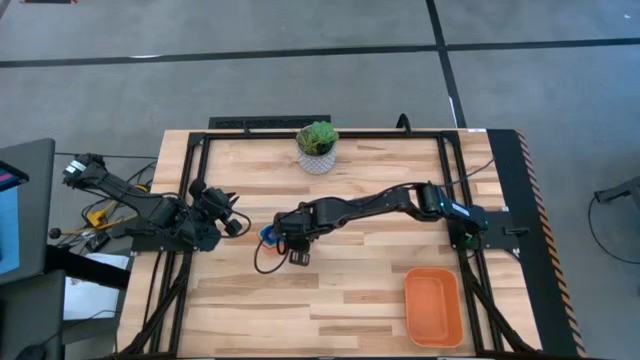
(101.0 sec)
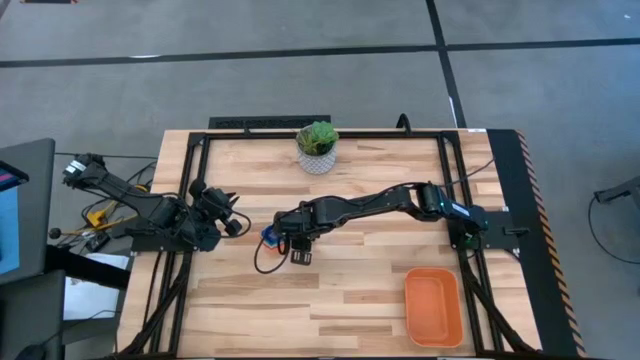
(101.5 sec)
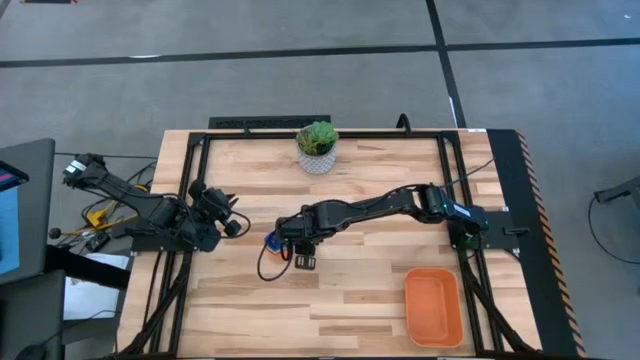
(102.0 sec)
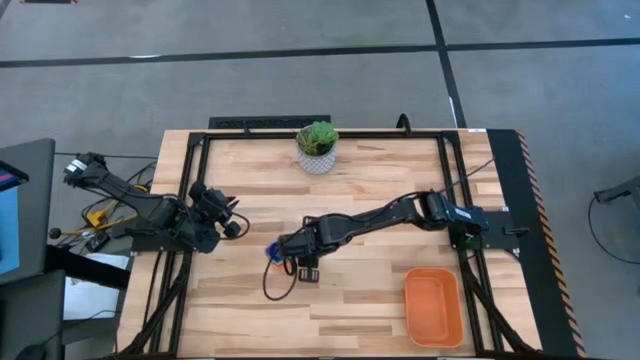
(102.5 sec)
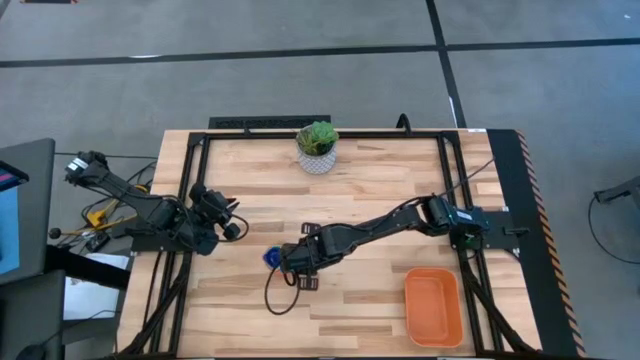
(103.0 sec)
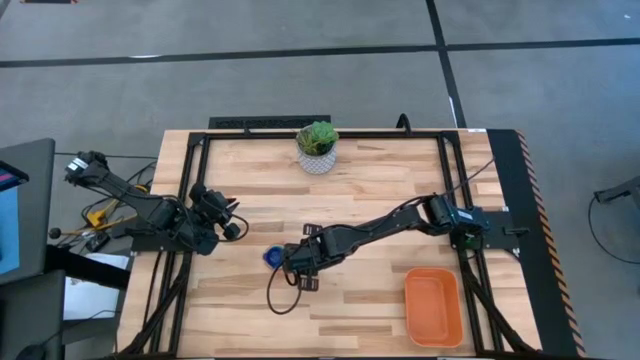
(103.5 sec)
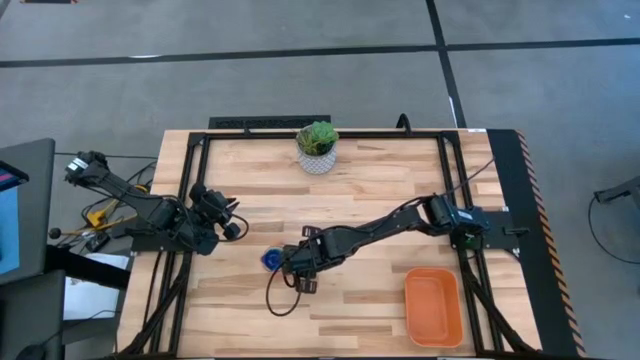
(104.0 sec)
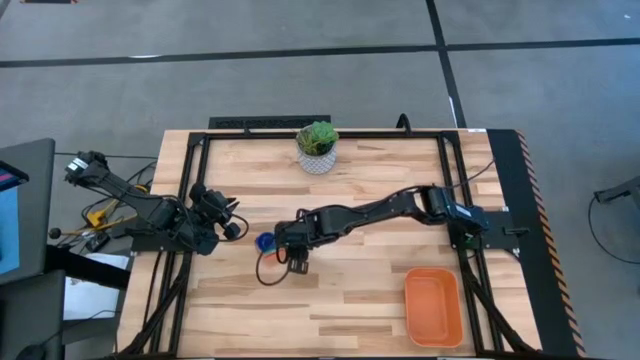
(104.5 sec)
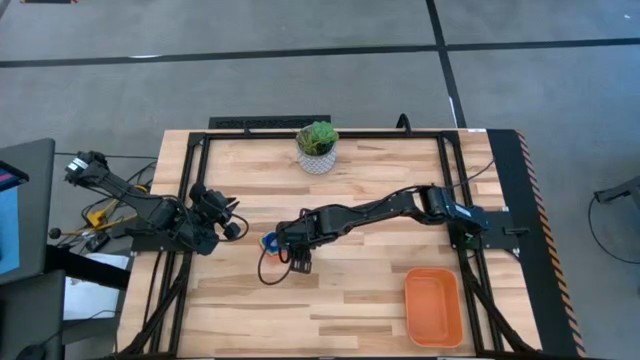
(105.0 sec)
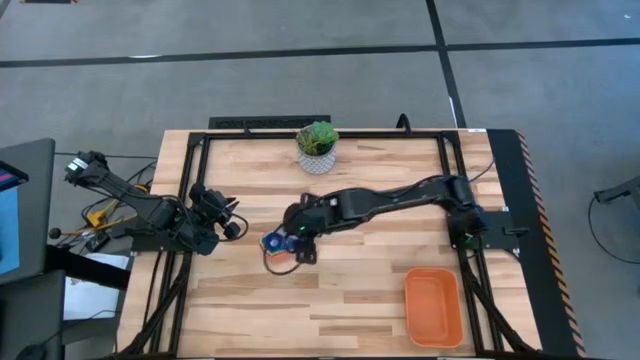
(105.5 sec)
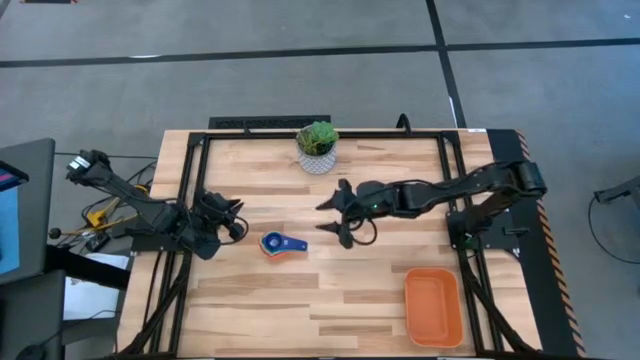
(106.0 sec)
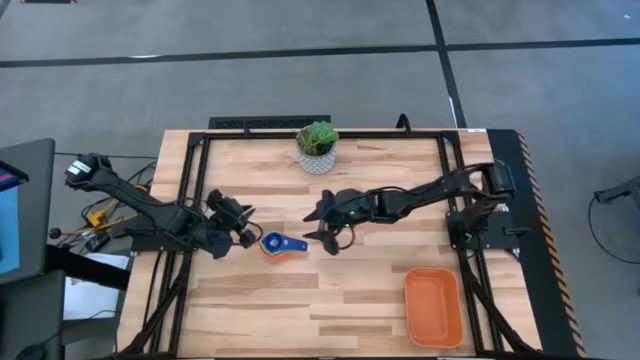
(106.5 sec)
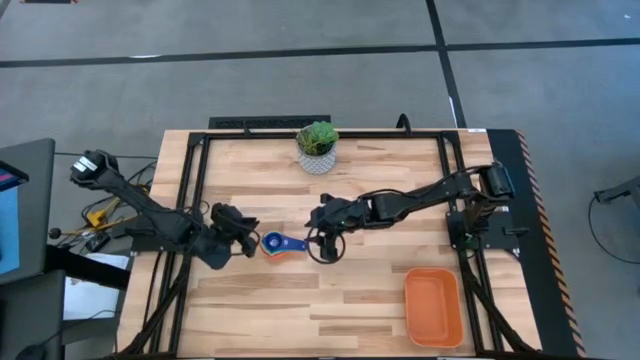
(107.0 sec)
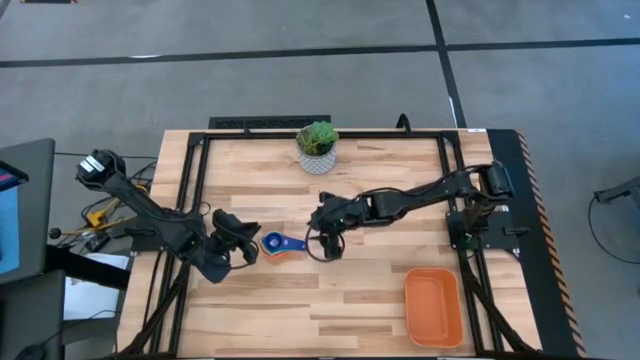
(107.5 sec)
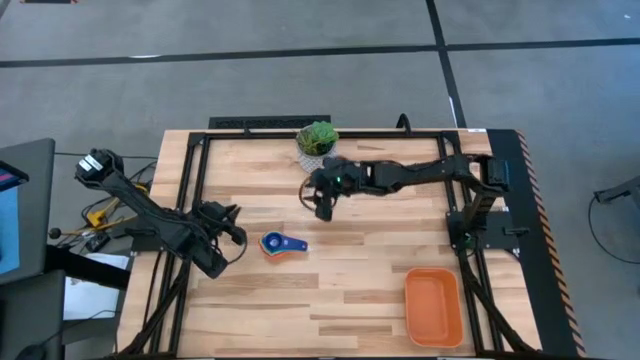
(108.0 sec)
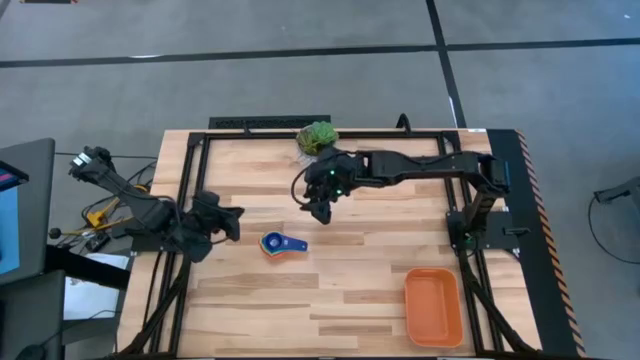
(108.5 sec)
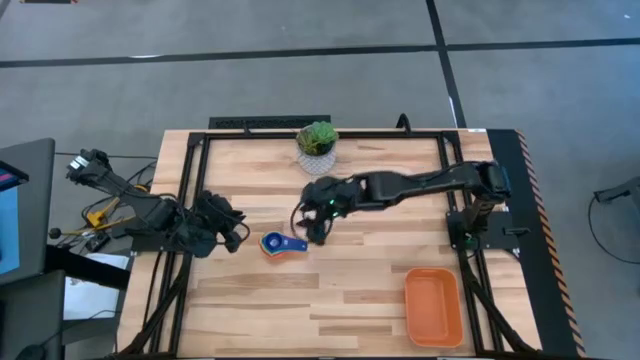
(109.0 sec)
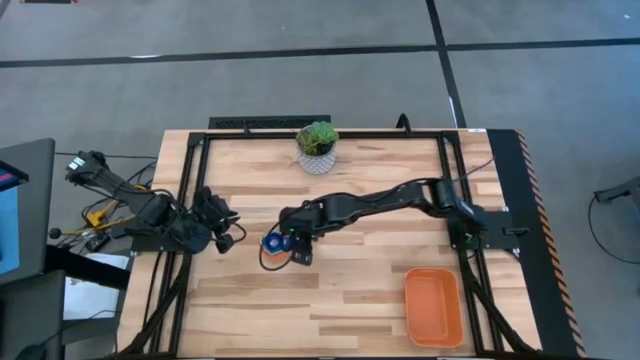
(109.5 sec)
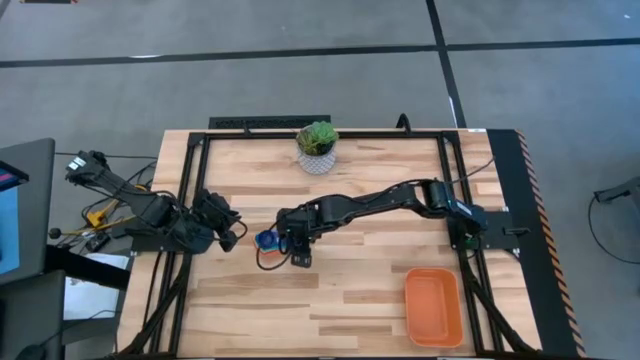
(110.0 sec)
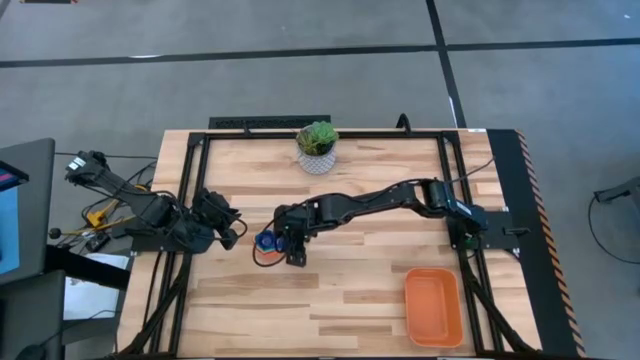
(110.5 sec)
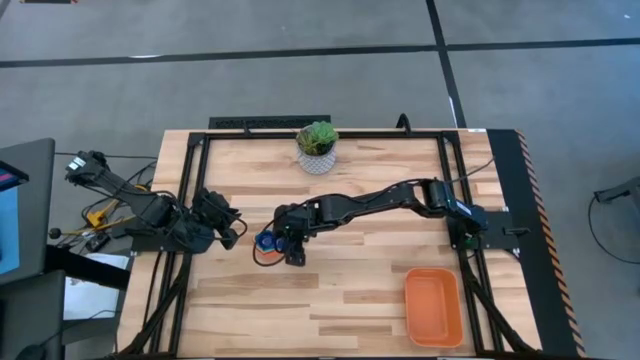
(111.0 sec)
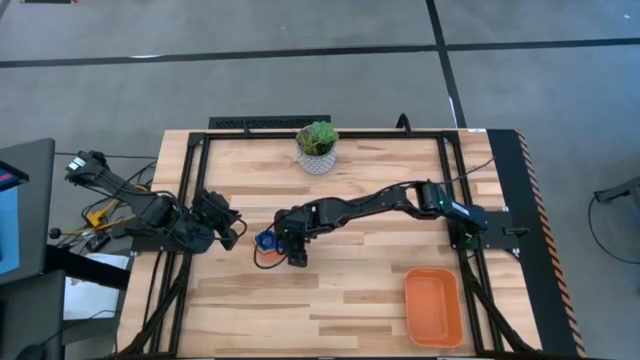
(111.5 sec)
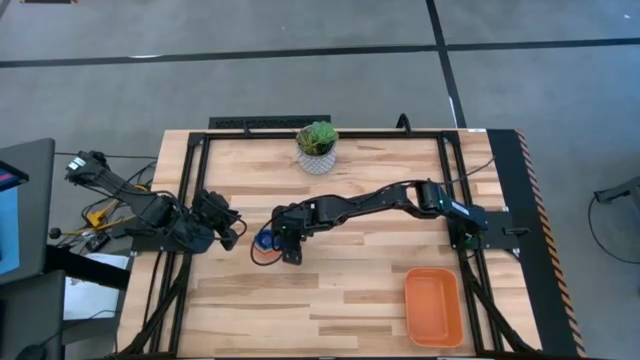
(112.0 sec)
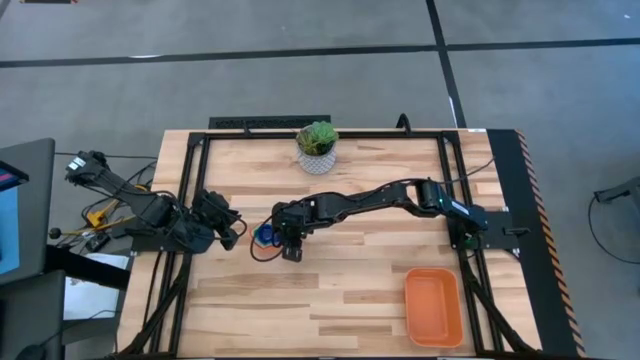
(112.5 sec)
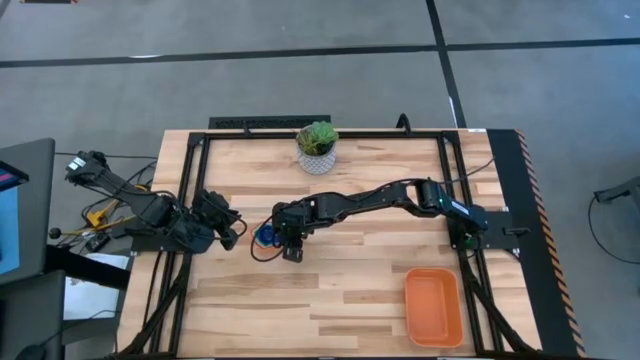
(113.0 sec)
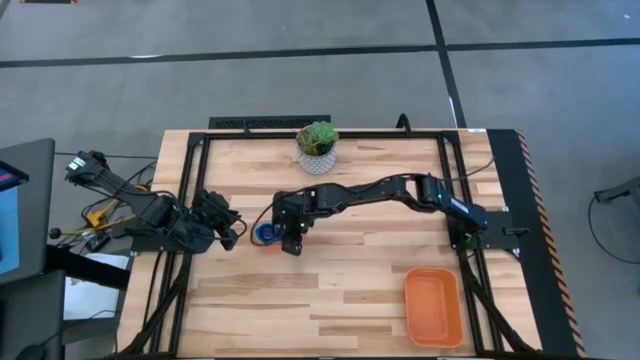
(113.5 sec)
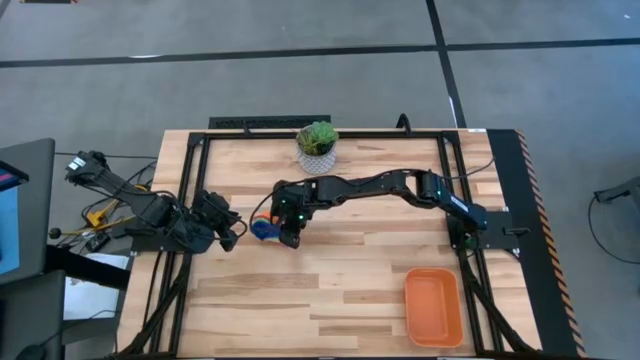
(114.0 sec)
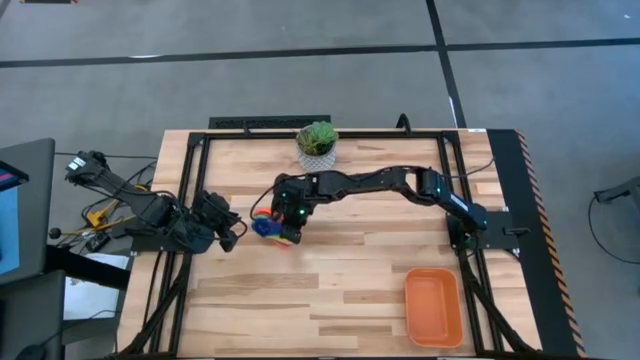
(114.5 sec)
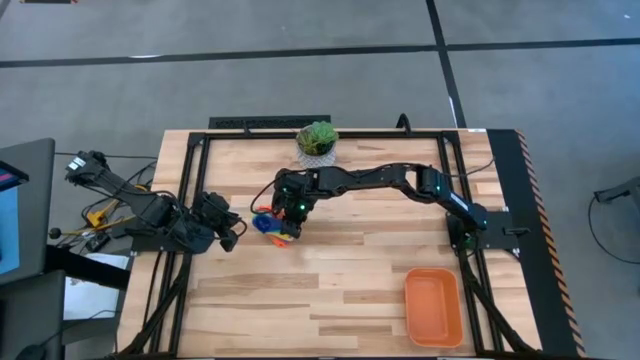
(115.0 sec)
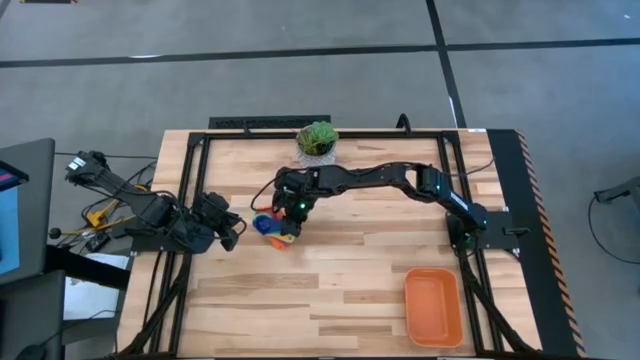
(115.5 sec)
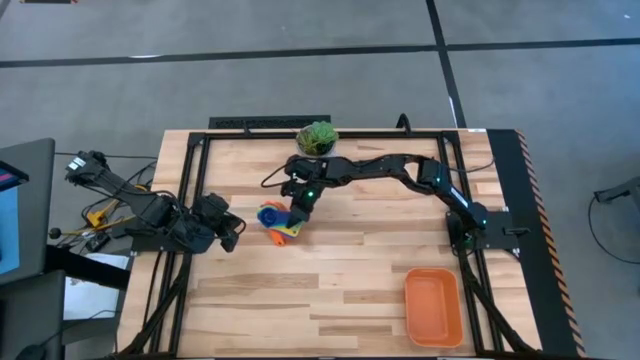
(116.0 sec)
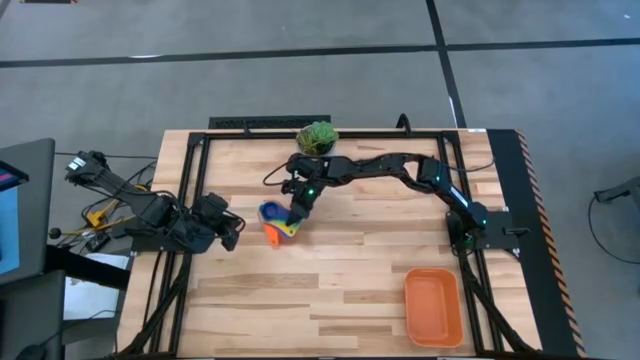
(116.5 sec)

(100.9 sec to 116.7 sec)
Task: Nest measuring cups in basket
Put the stacked measuring cups into the orange bin

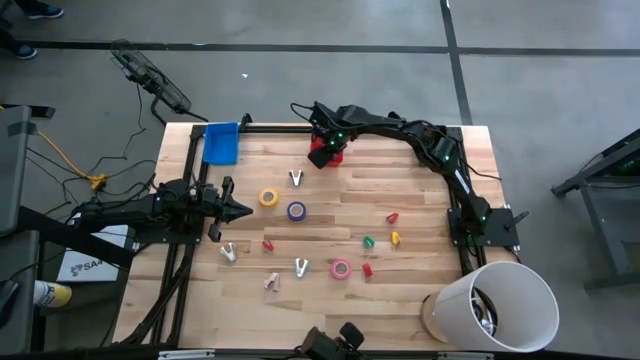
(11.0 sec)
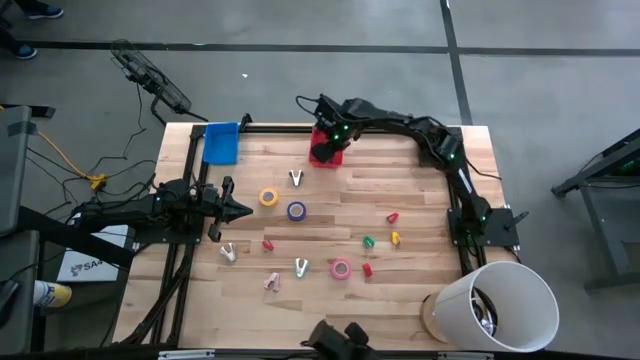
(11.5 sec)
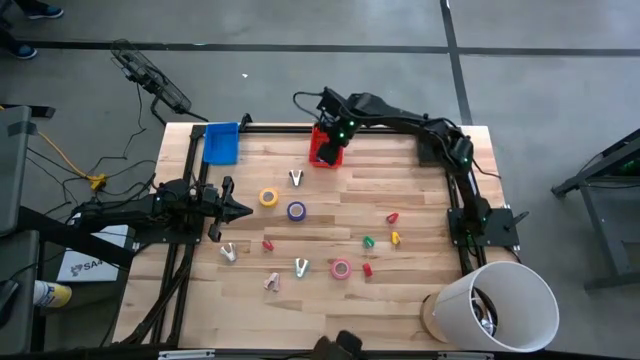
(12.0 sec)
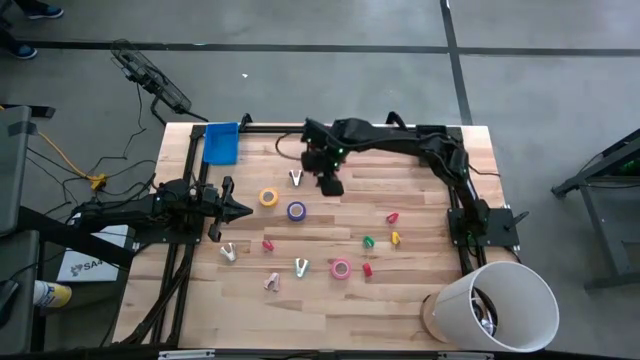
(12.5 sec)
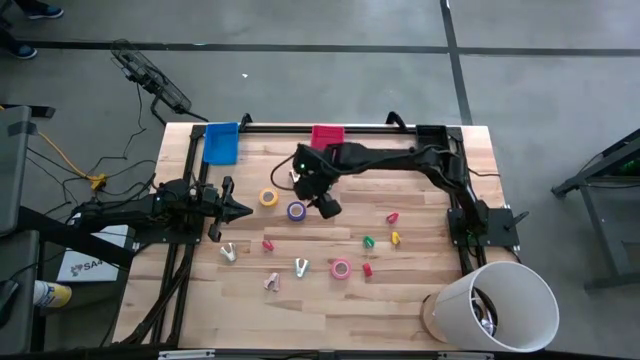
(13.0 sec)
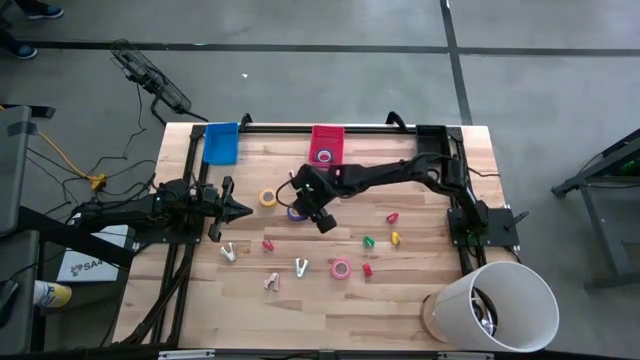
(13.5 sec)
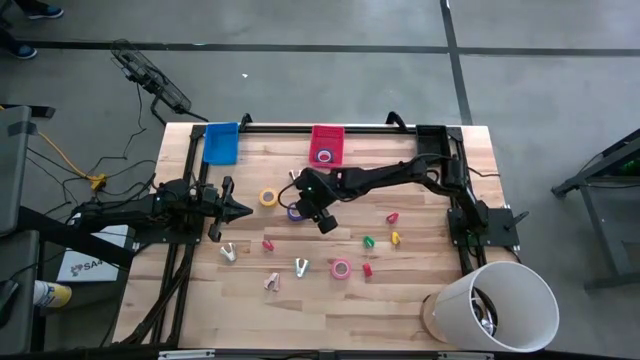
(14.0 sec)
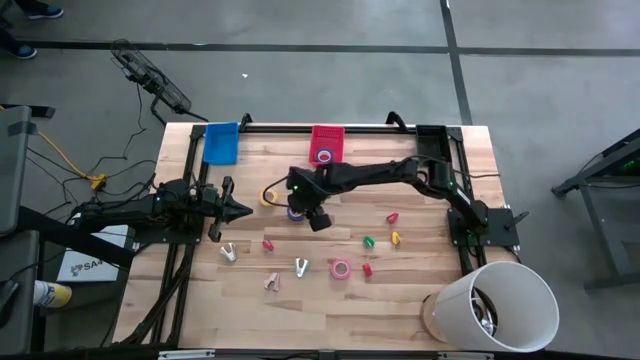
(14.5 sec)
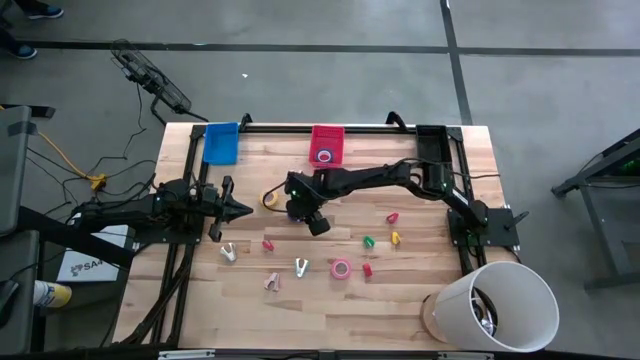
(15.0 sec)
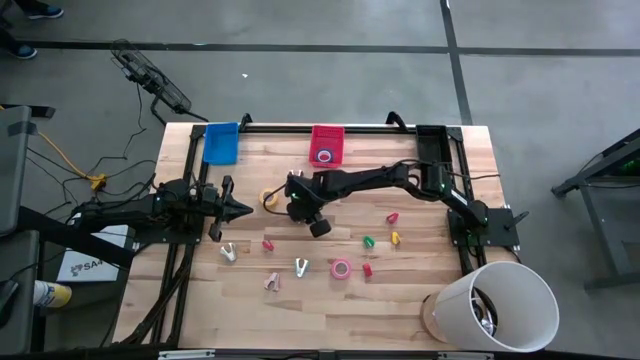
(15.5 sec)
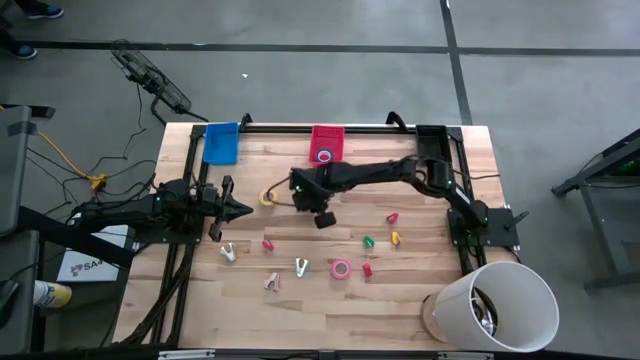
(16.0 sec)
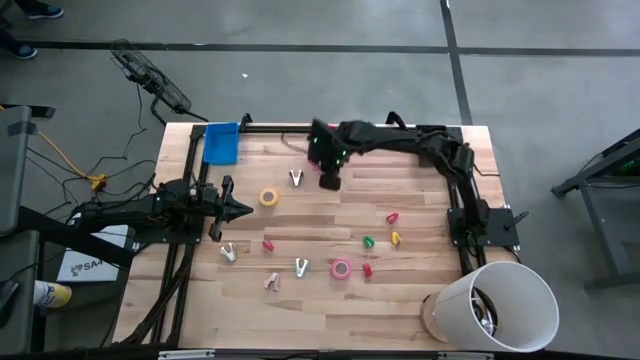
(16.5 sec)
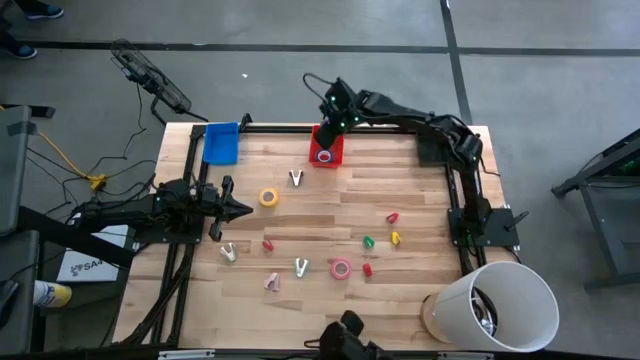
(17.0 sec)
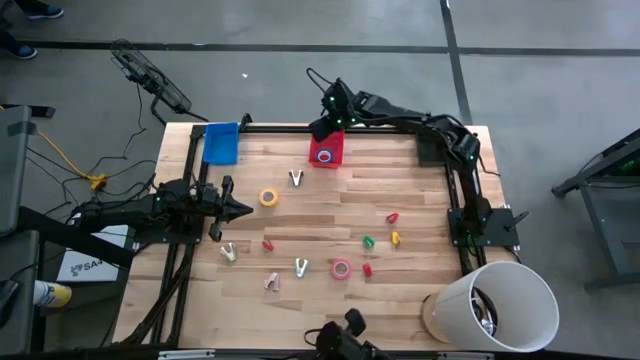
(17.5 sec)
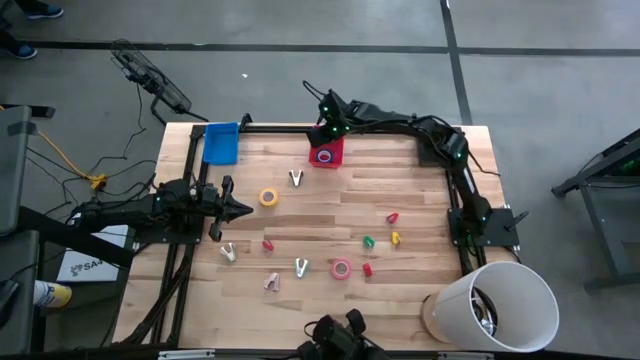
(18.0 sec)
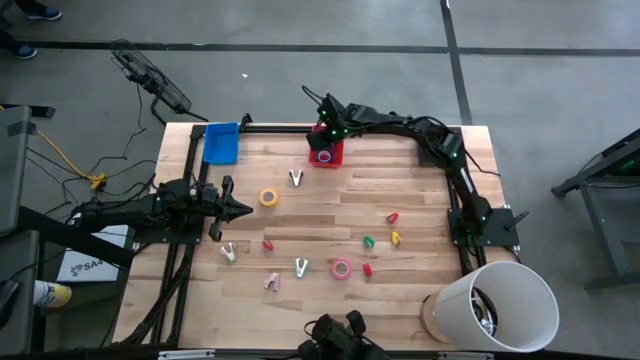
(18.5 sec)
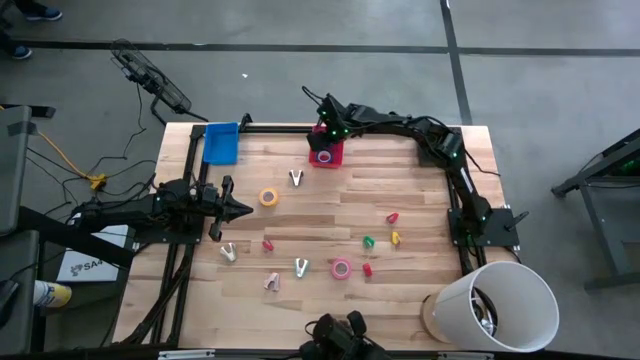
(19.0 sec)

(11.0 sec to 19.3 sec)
Task: Pick and place Stapler, Stapler remover, tape
Put the violet tape into the red bin
